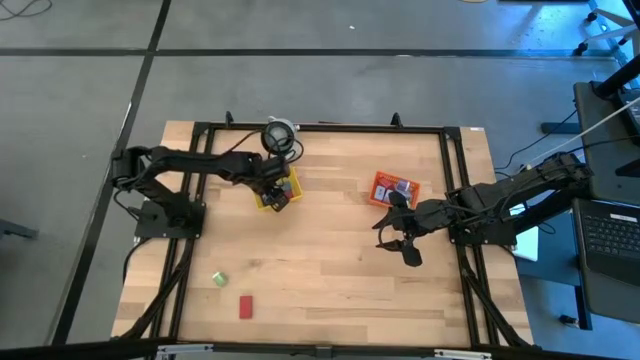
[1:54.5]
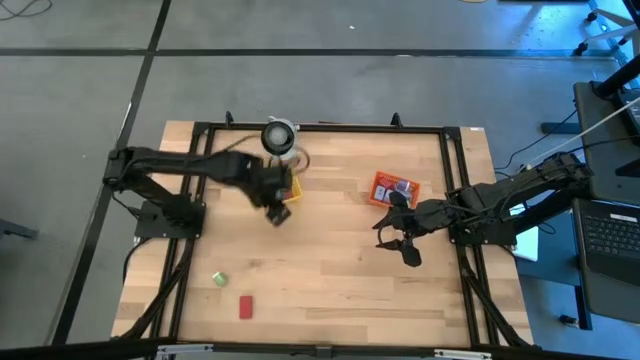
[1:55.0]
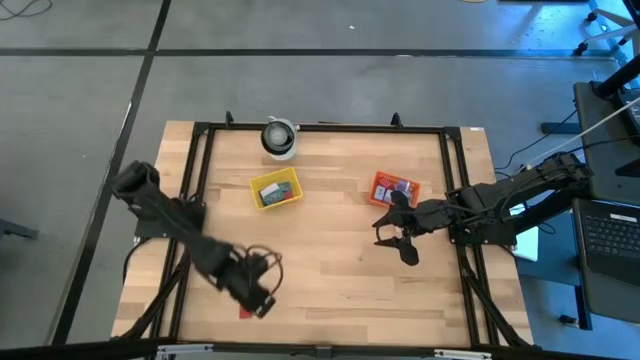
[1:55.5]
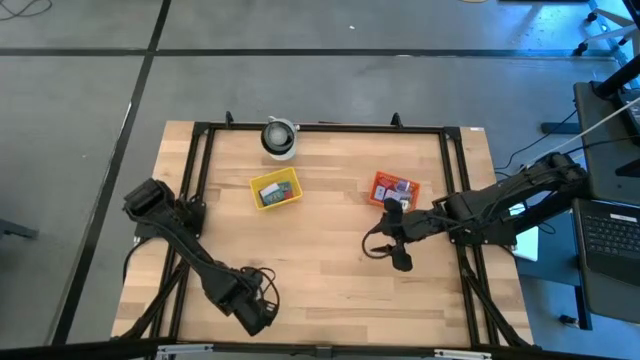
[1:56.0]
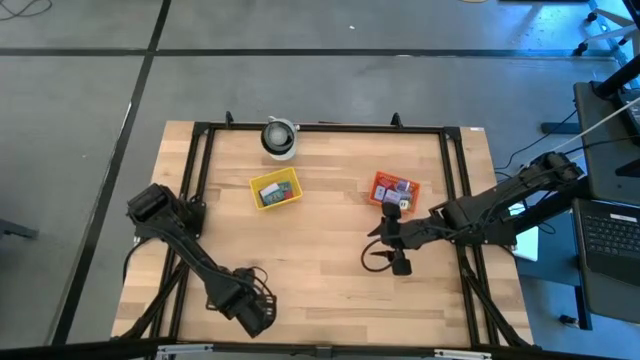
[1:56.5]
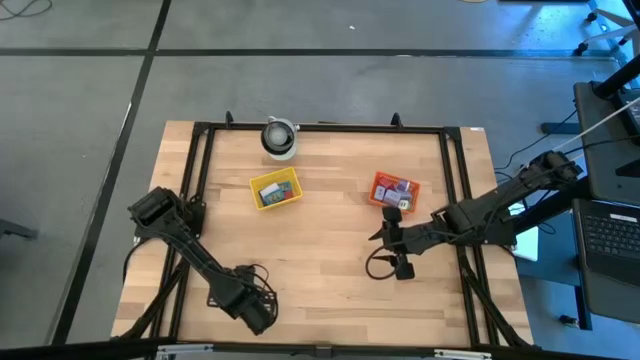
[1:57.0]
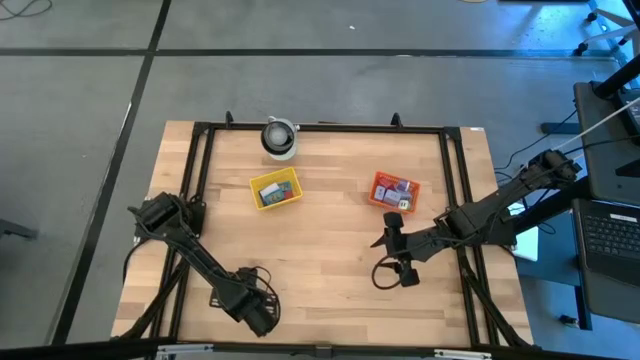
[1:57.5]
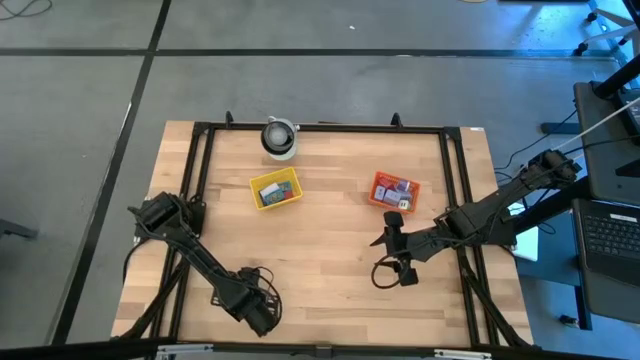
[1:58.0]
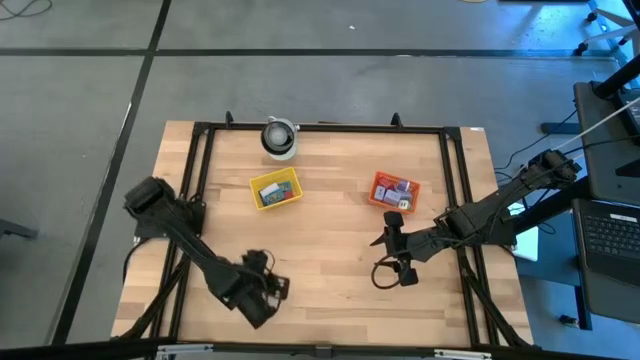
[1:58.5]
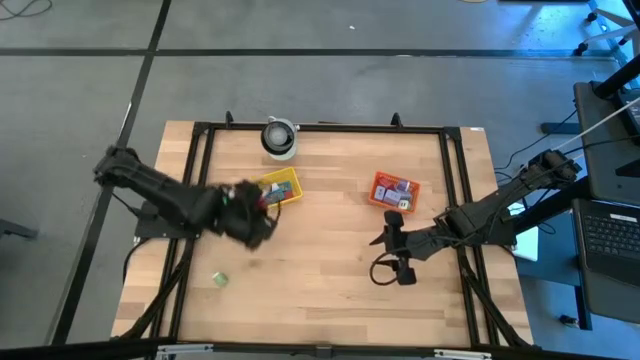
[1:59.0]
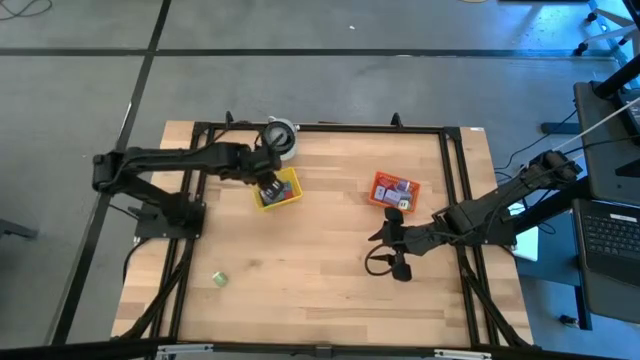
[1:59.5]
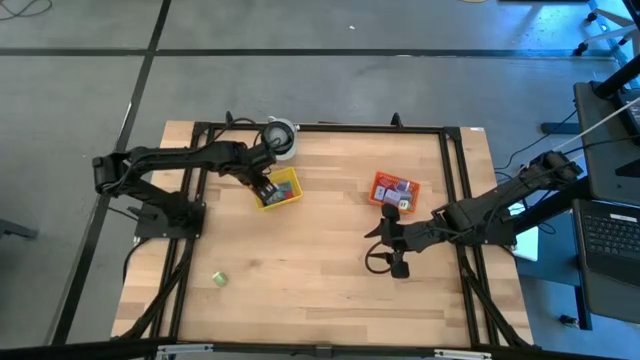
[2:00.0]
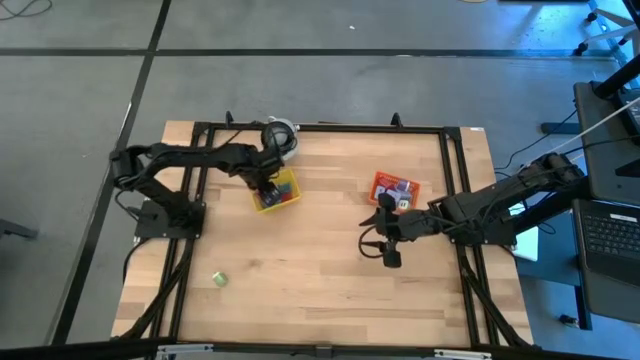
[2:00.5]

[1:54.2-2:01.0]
Task: Pick & Place Office items
Put the red digital clock into the yellow bin

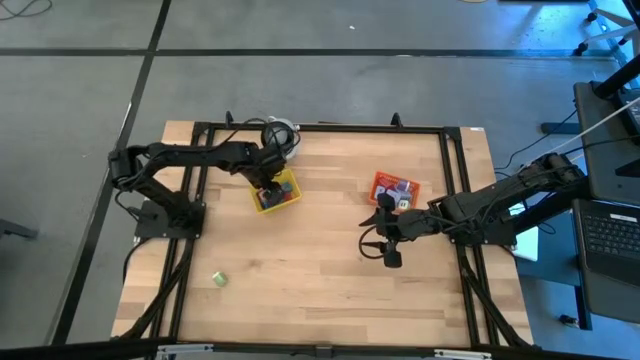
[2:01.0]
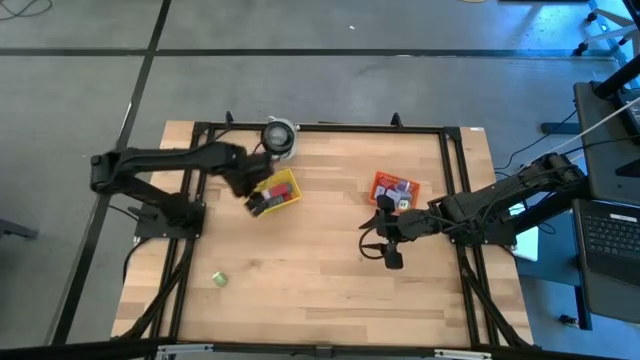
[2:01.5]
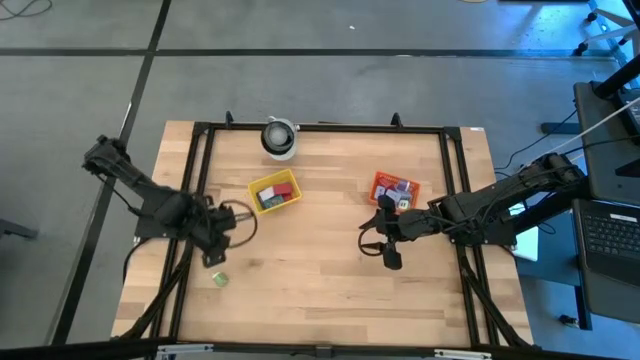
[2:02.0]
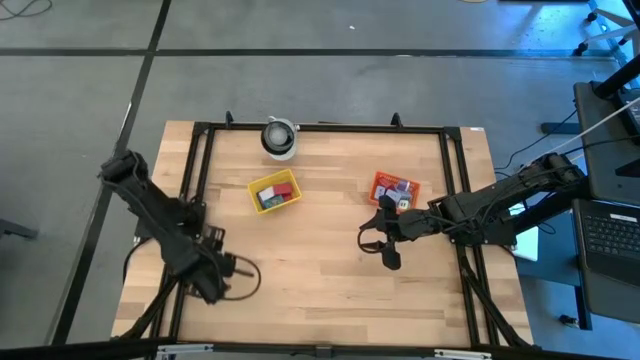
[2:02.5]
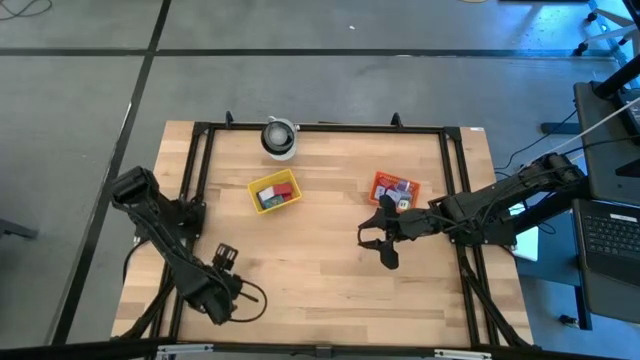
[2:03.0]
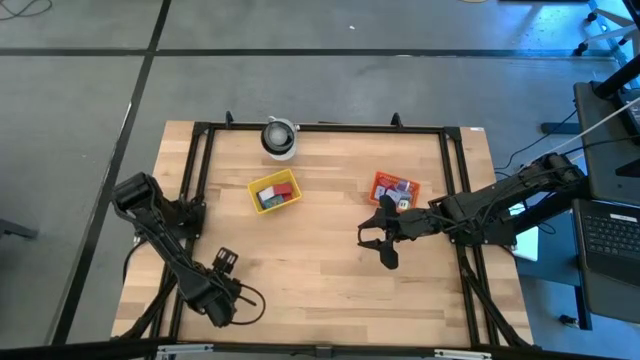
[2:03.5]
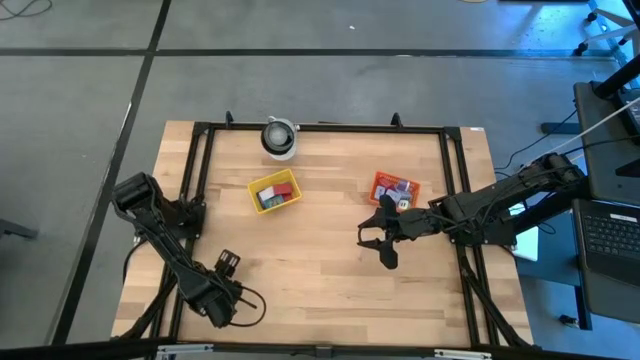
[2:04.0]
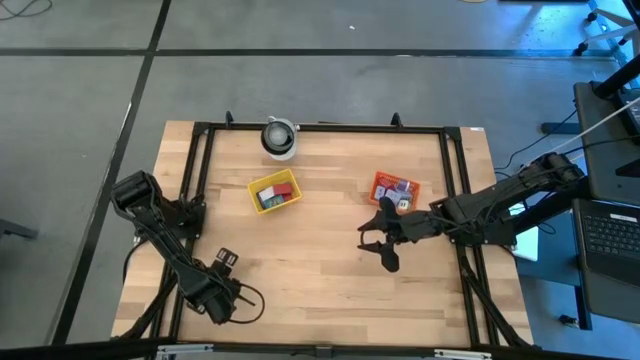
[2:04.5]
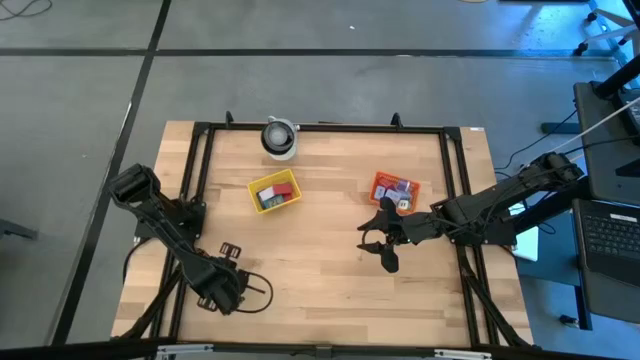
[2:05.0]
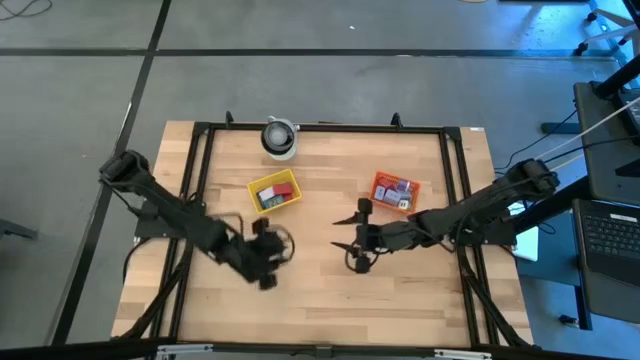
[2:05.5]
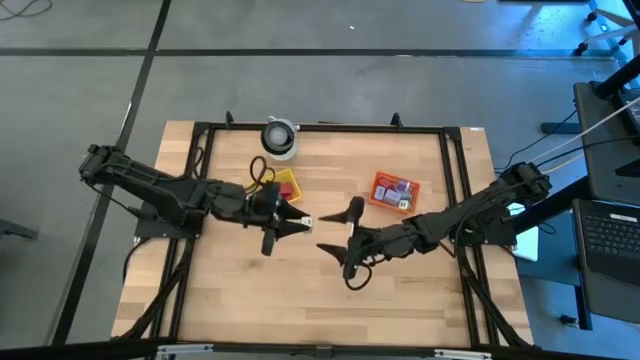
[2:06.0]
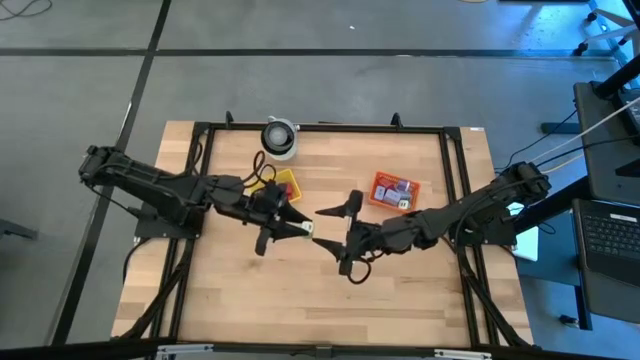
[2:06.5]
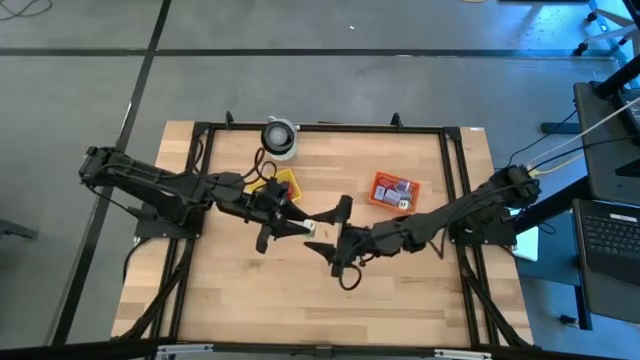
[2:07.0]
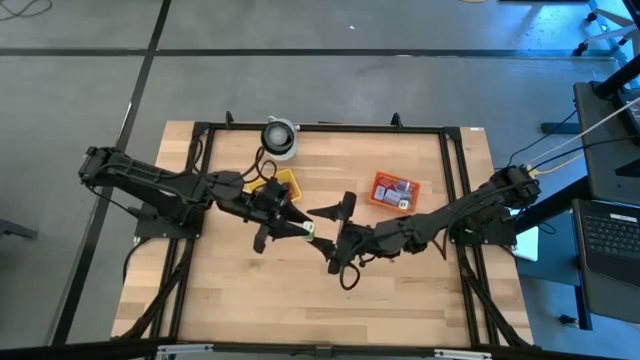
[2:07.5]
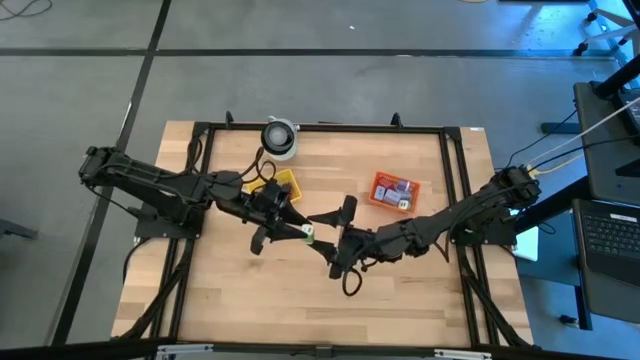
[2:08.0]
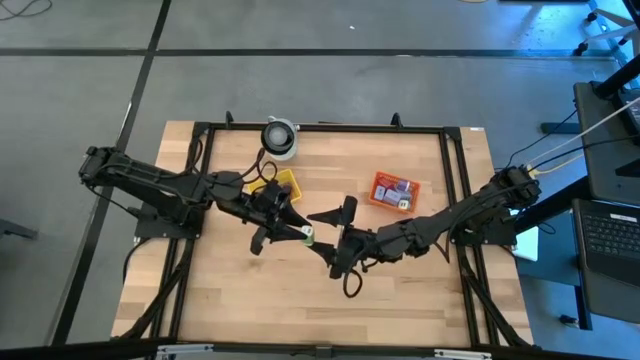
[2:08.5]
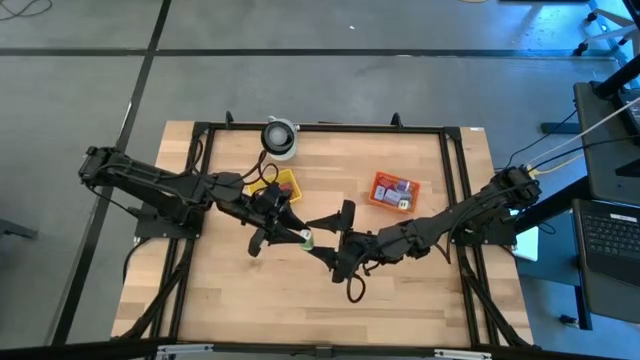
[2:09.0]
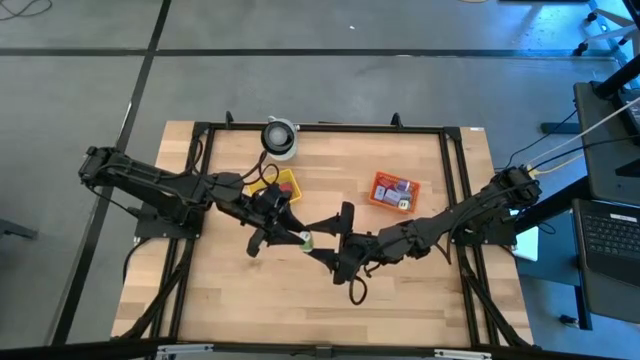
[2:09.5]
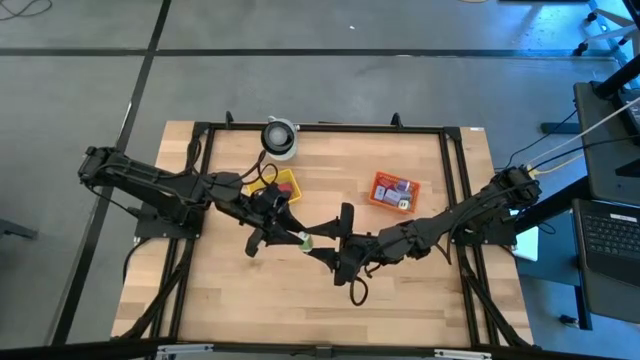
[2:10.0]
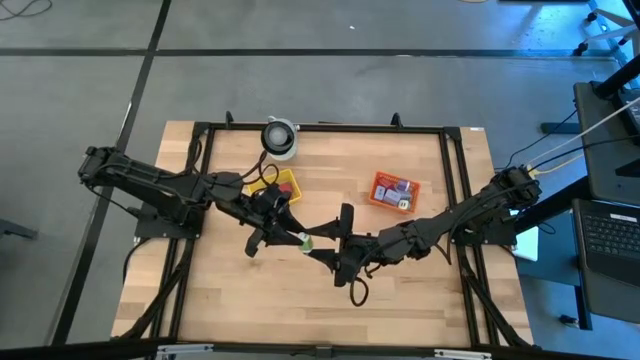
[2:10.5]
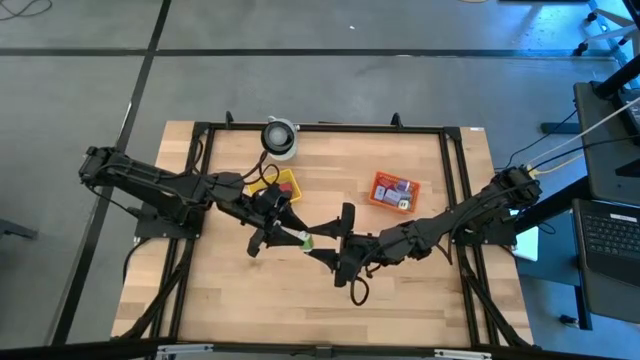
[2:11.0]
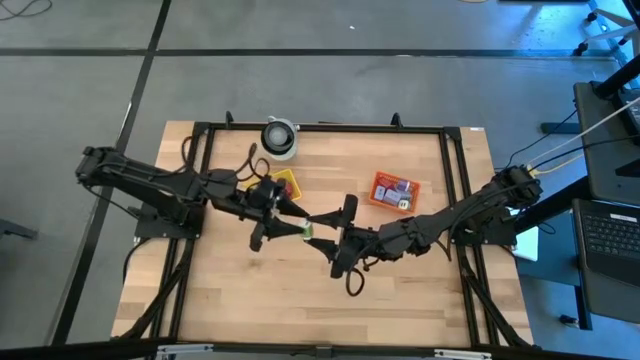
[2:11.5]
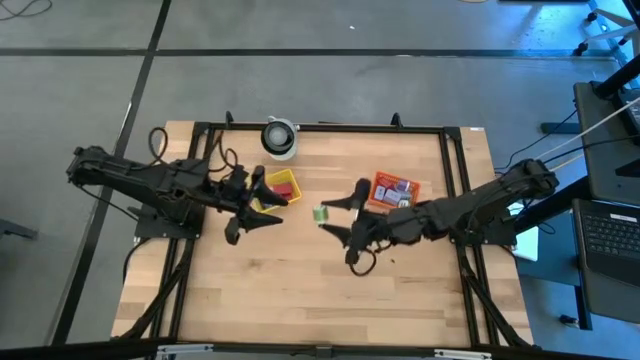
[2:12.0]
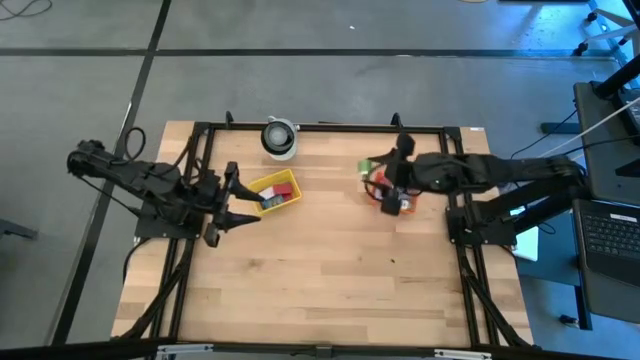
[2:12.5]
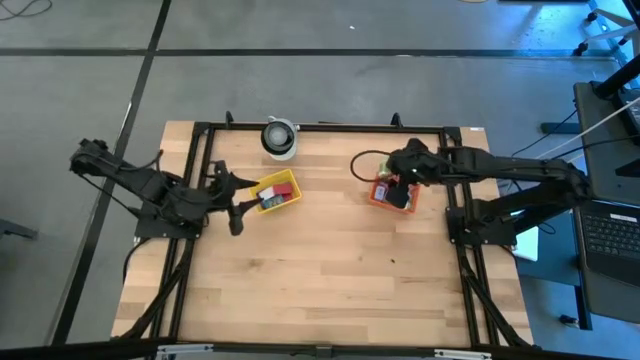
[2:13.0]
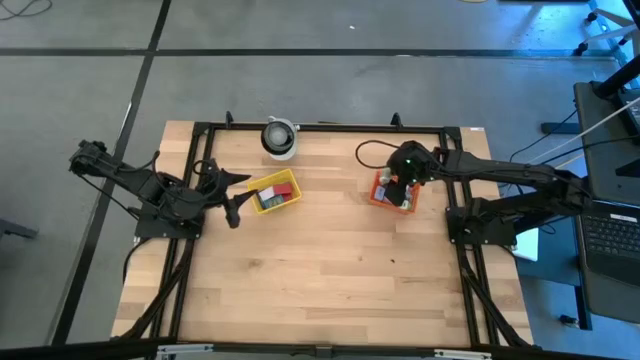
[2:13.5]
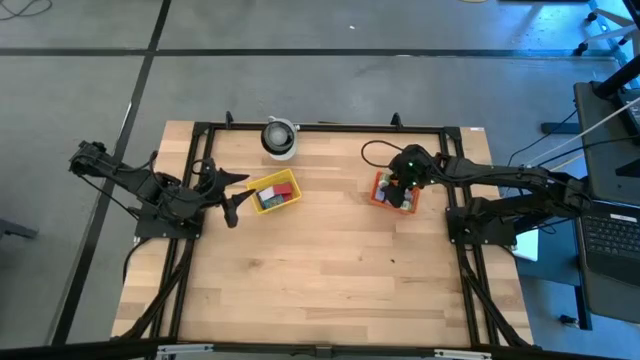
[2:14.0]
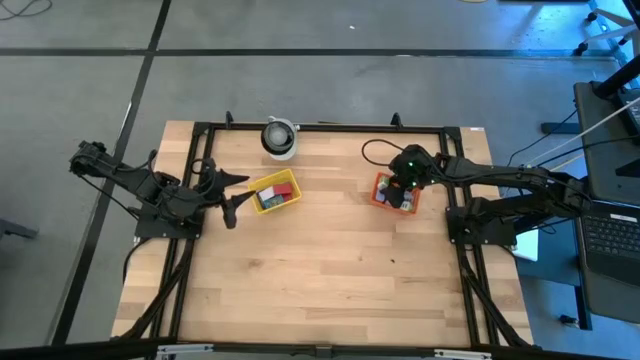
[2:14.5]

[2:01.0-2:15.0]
Put the green charger adapter into the orange bin
